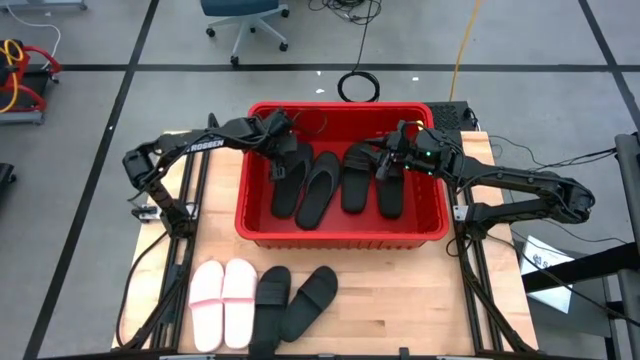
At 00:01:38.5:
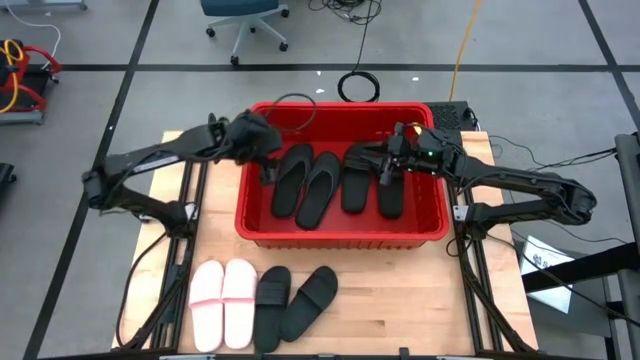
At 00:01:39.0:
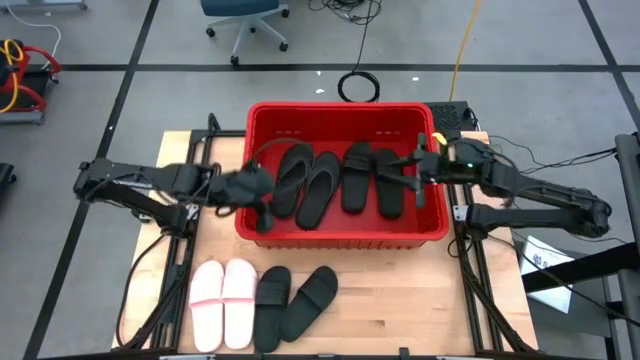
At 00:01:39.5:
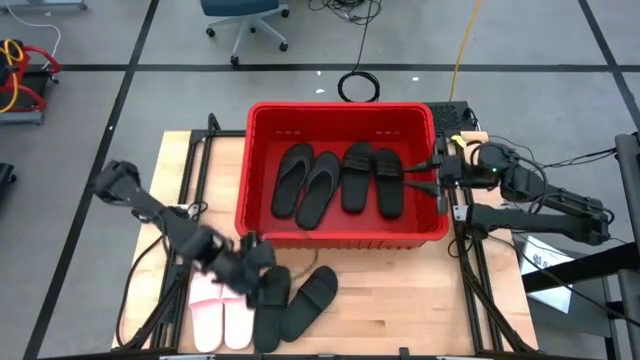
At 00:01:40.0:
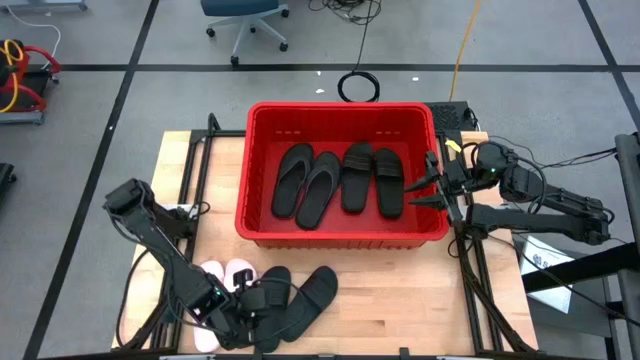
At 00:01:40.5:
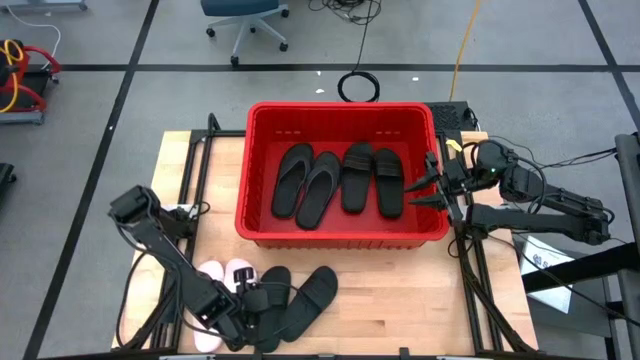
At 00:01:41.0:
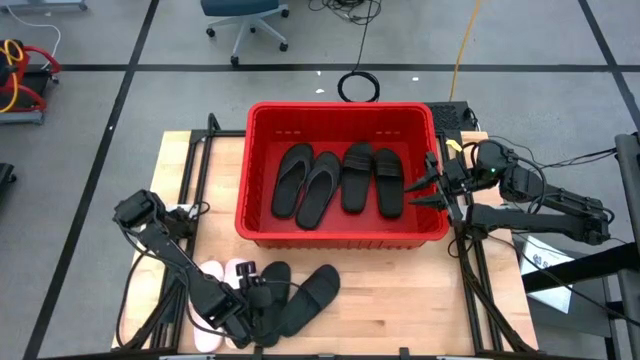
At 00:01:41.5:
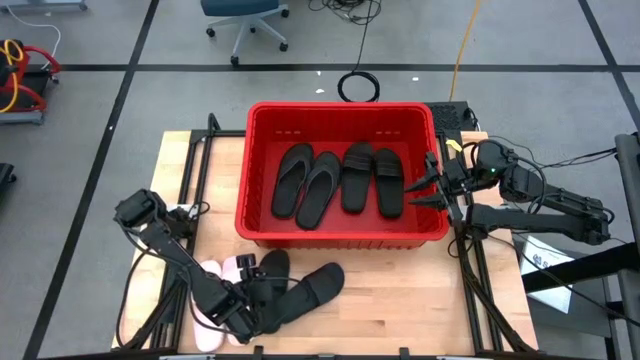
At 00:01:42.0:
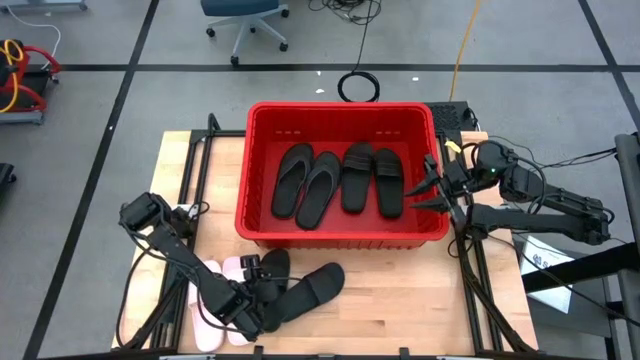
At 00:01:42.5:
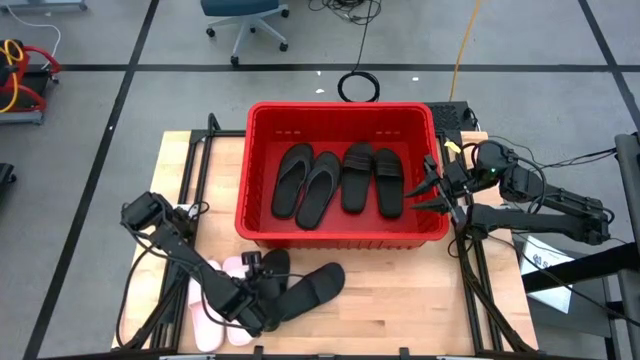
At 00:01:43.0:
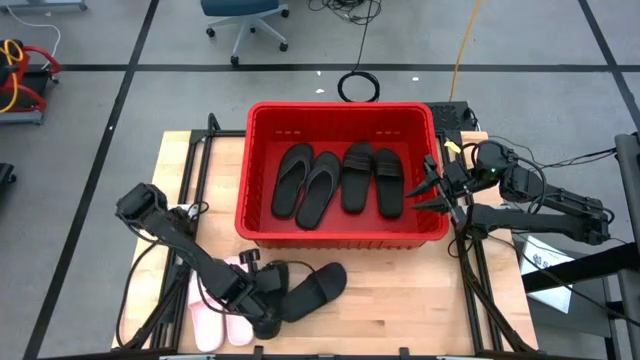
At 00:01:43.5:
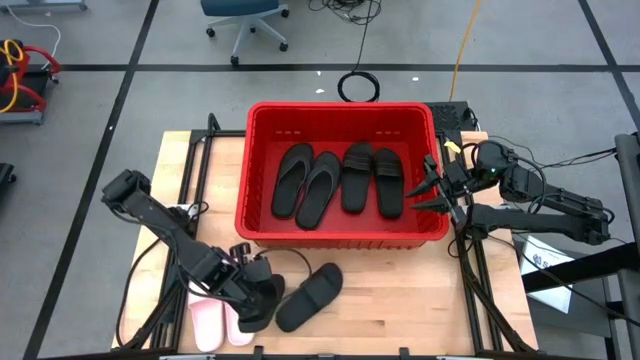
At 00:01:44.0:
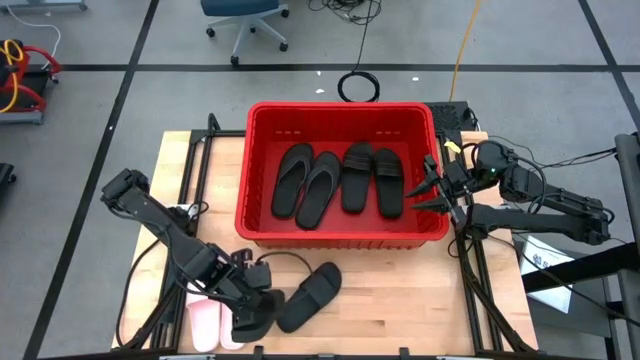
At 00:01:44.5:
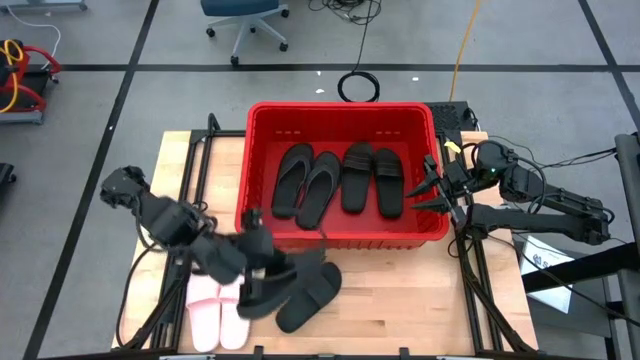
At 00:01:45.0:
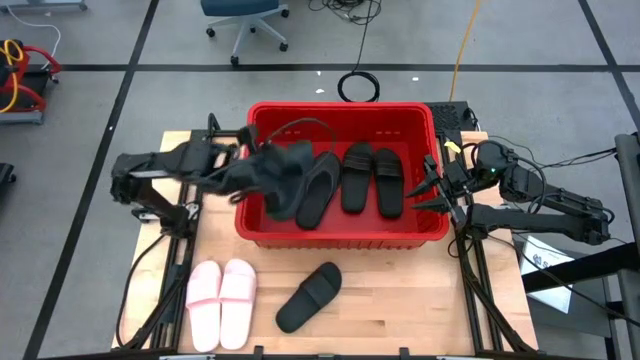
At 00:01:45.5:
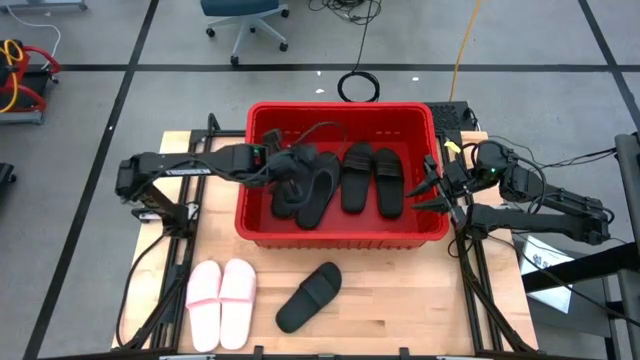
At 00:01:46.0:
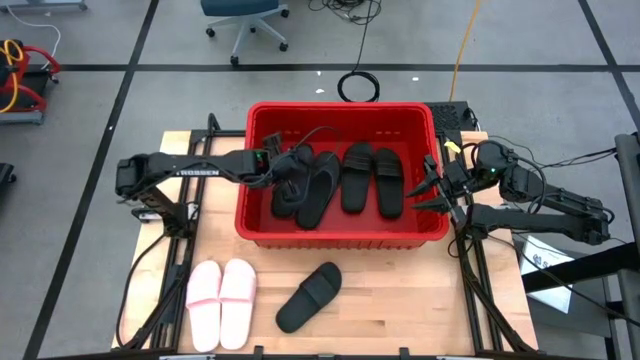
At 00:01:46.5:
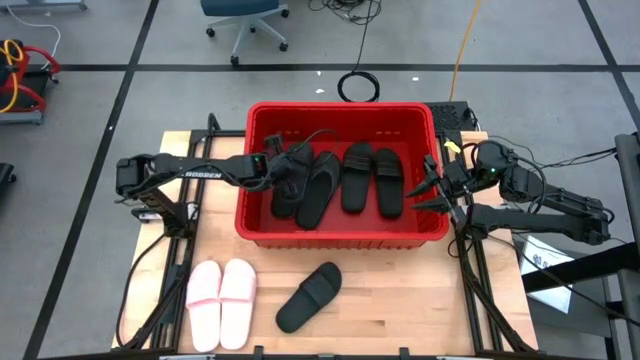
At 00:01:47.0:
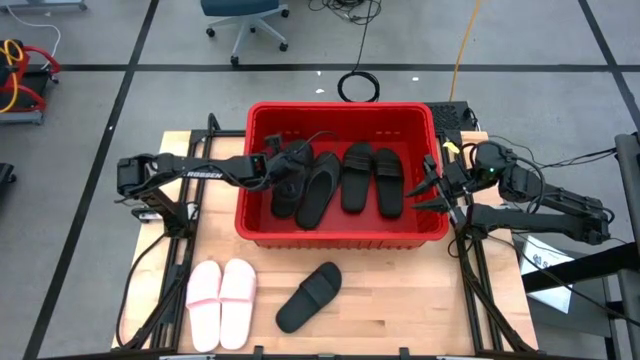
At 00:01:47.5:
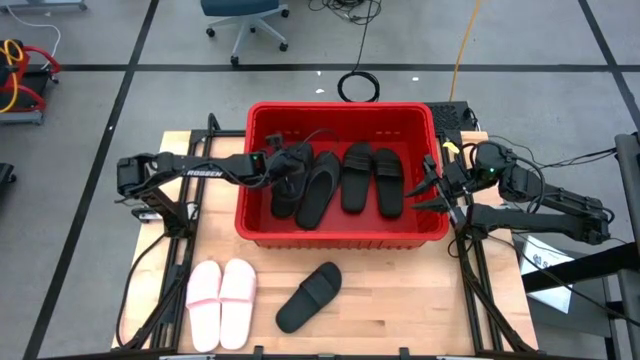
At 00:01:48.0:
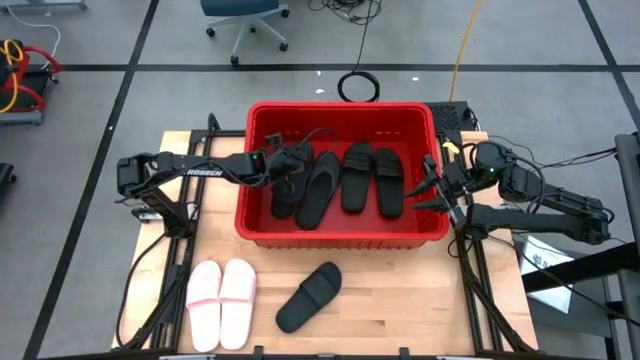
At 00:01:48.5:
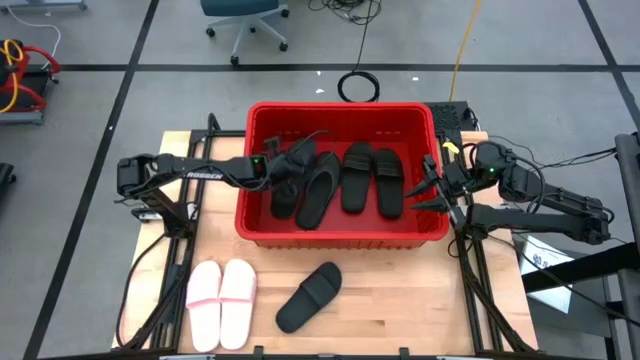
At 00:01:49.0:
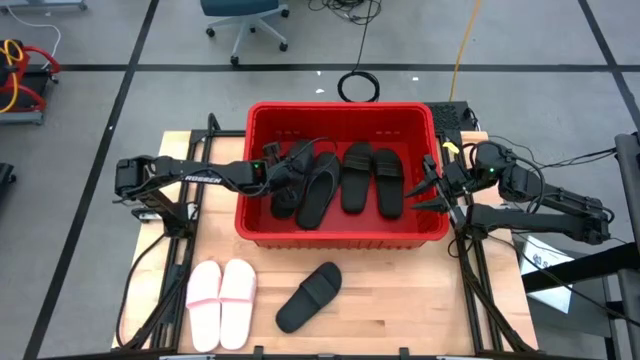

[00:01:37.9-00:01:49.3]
Task: Pick and place slides into bin
Put the black slide into the red bin

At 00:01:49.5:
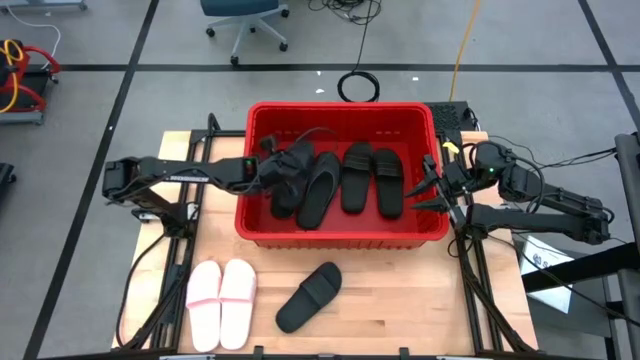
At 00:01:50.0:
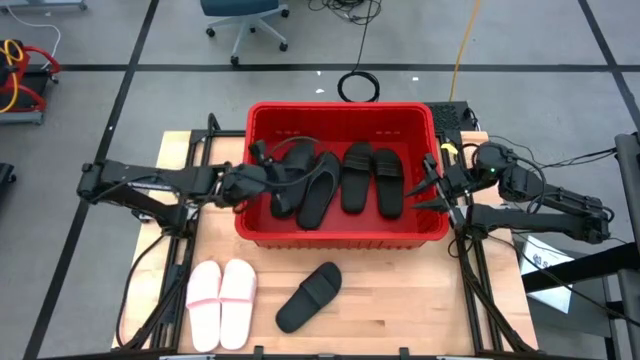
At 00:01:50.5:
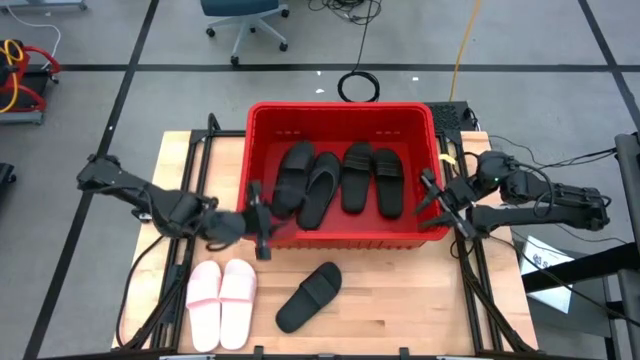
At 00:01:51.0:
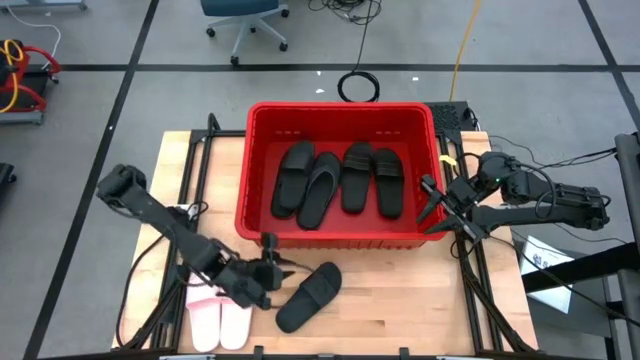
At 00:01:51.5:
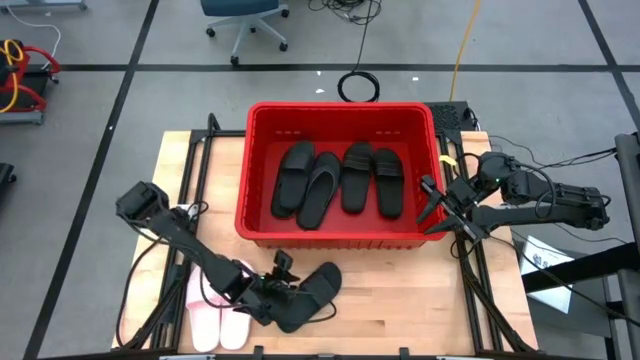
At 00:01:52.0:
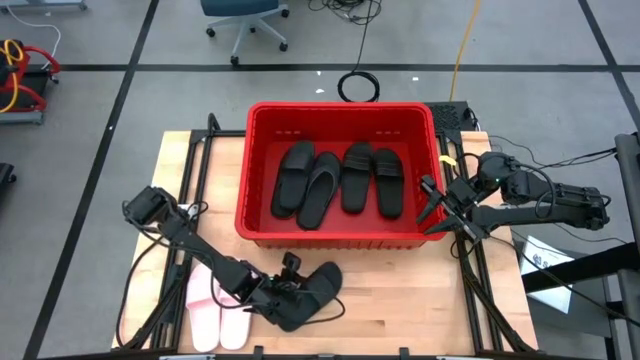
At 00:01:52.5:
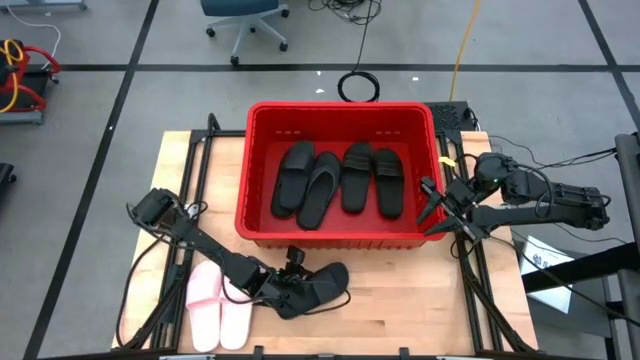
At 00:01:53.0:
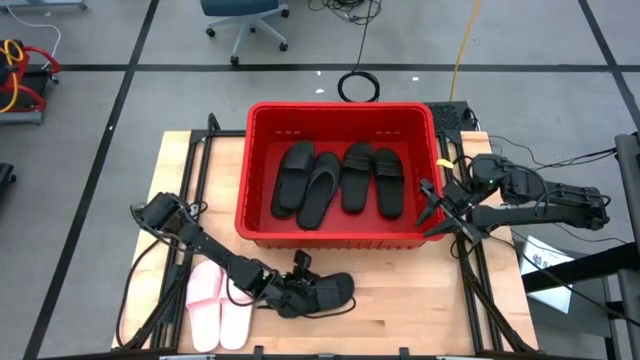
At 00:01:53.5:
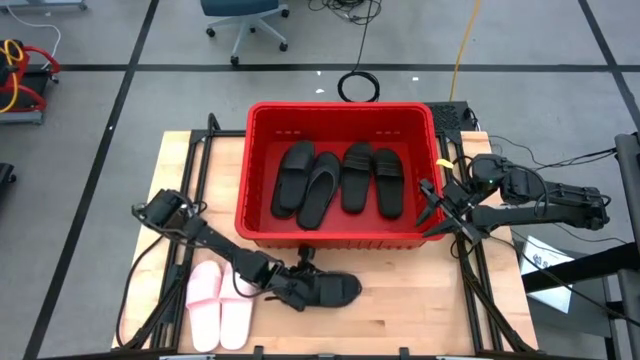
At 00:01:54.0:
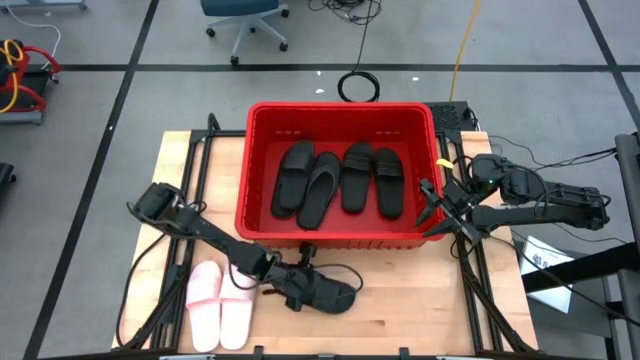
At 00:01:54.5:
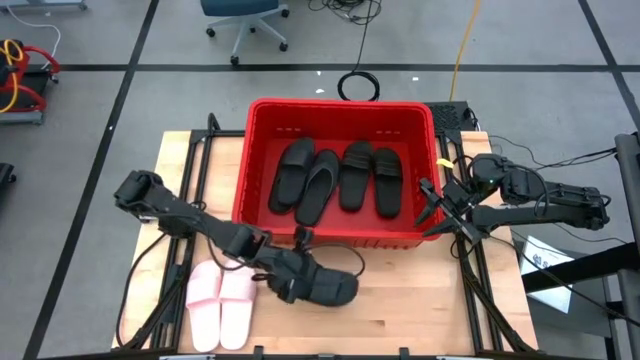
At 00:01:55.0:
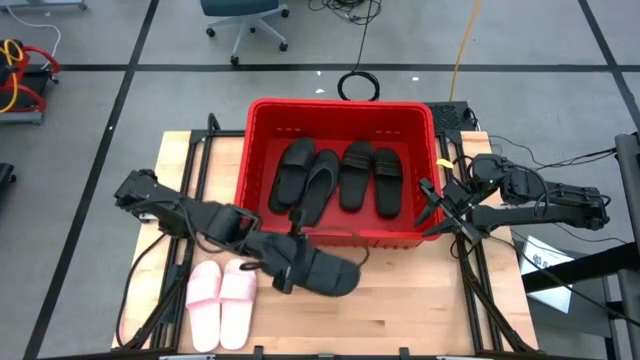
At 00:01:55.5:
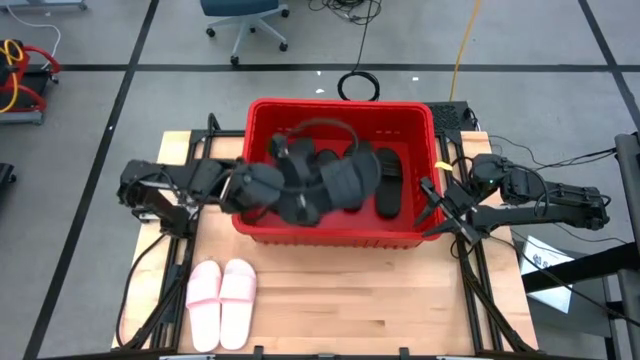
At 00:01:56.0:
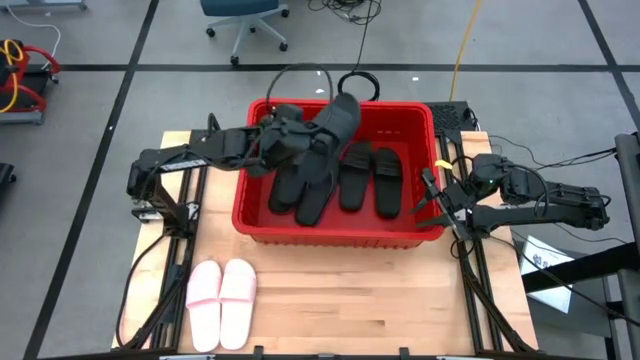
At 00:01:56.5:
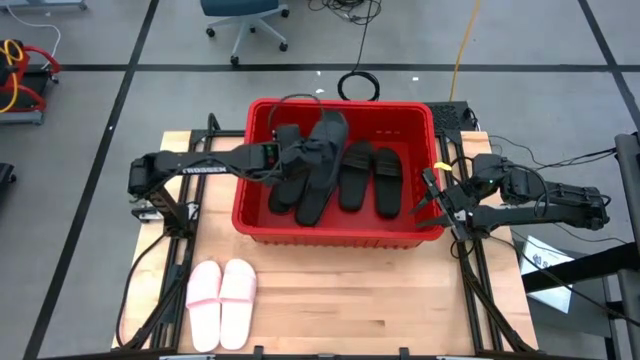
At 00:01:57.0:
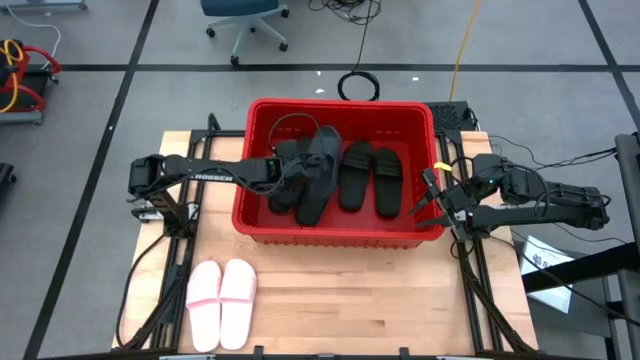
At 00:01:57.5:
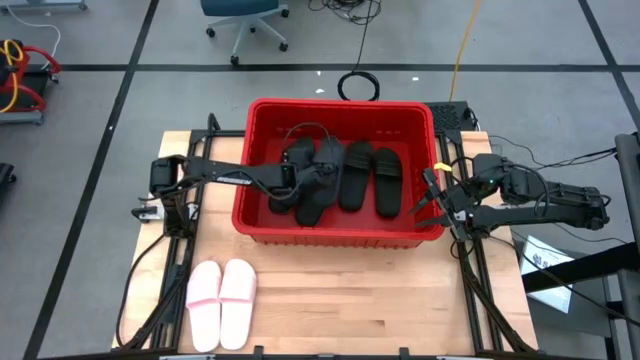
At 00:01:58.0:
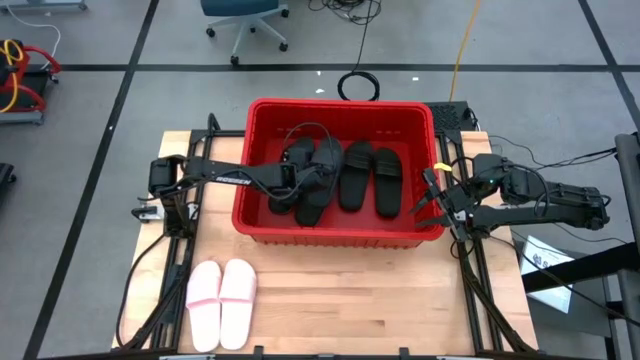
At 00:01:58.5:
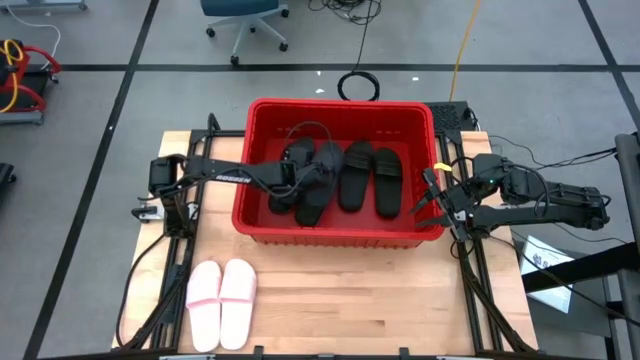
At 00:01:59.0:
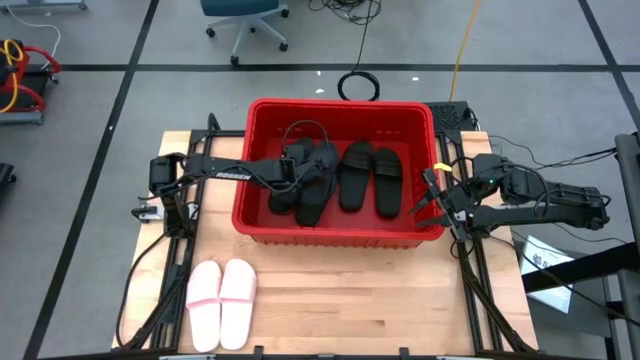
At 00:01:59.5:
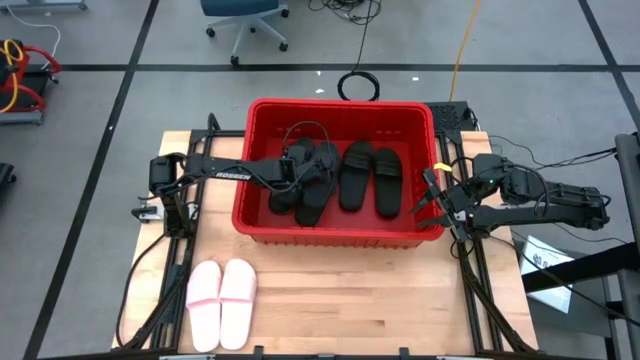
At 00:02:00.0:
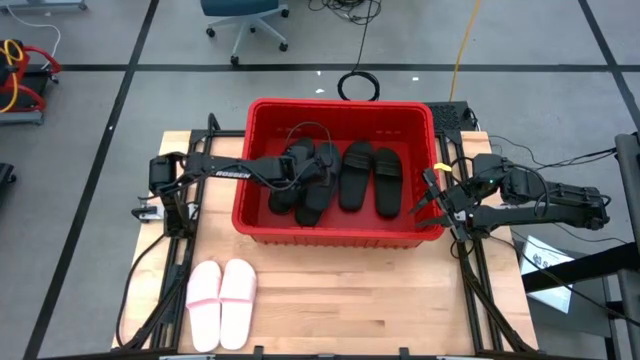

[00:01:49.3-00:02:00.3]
Put the black slide into the red bin
